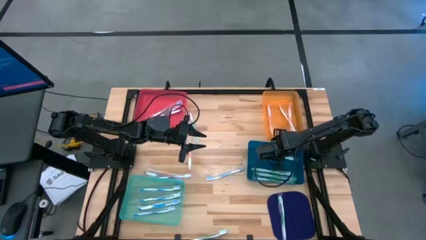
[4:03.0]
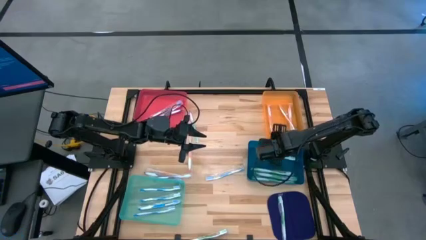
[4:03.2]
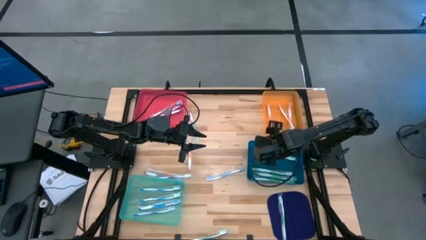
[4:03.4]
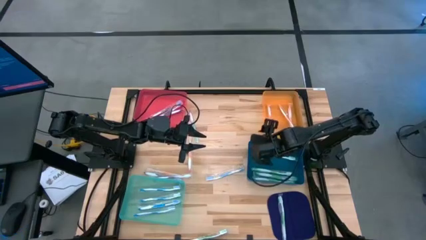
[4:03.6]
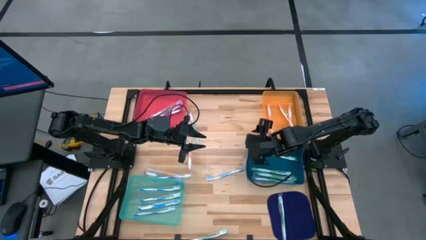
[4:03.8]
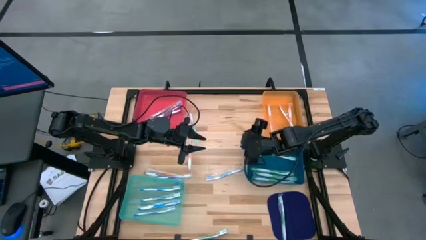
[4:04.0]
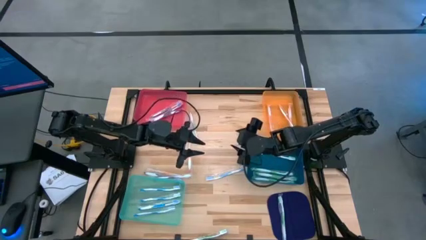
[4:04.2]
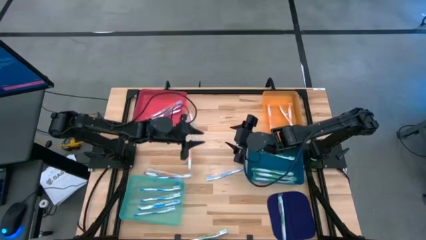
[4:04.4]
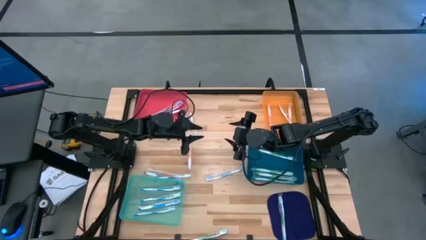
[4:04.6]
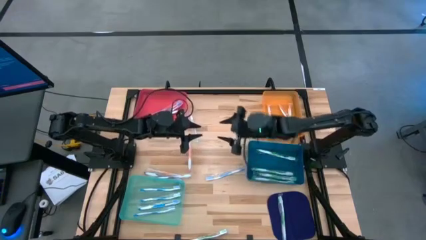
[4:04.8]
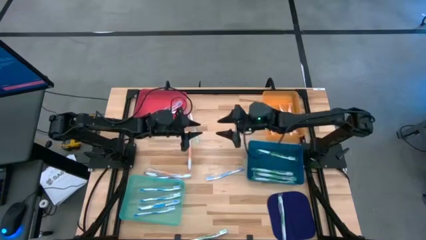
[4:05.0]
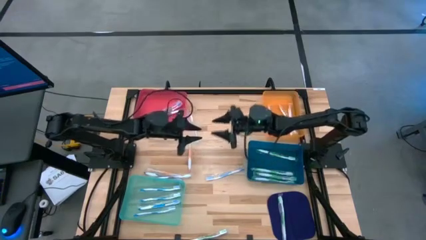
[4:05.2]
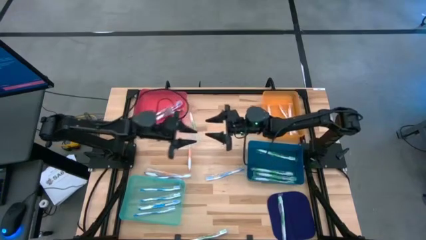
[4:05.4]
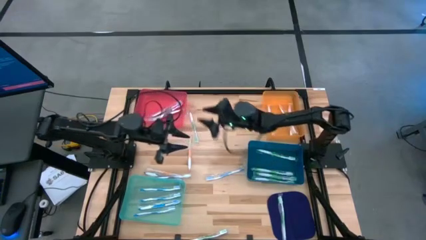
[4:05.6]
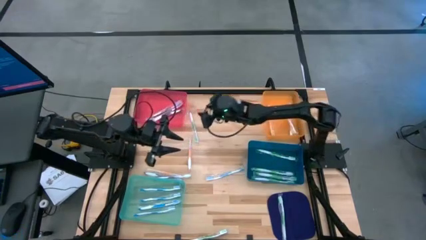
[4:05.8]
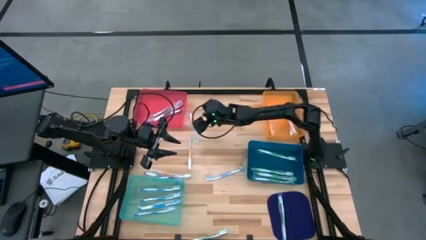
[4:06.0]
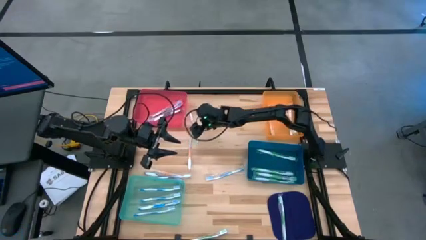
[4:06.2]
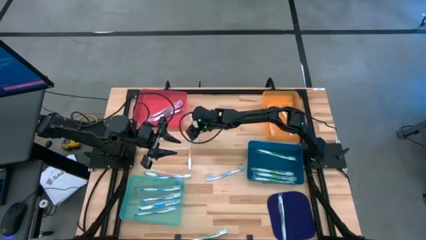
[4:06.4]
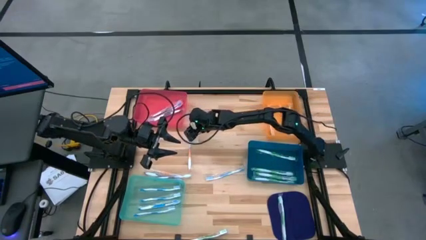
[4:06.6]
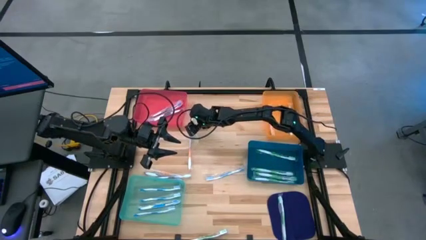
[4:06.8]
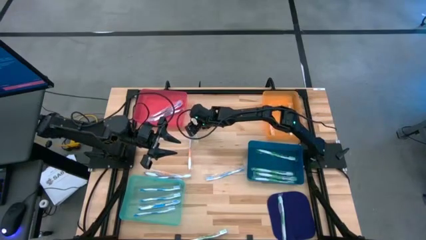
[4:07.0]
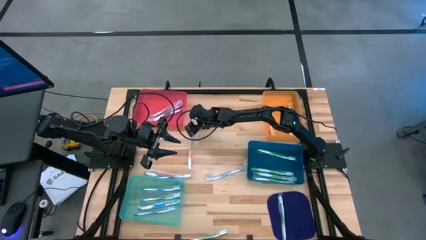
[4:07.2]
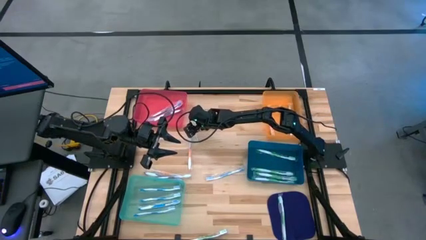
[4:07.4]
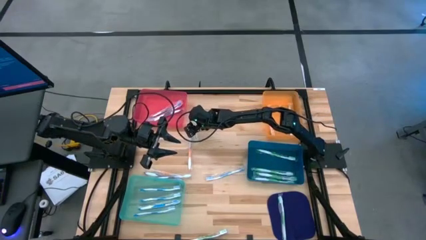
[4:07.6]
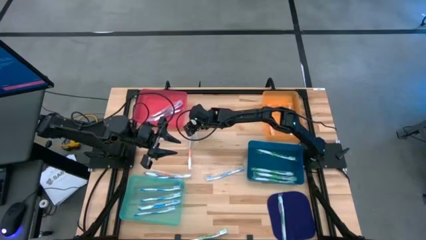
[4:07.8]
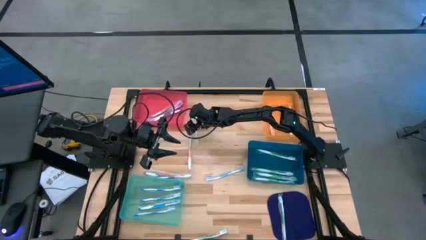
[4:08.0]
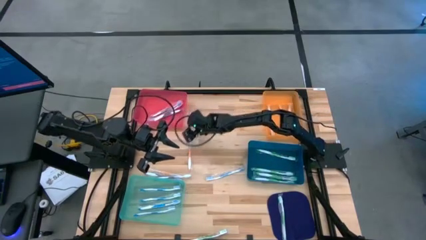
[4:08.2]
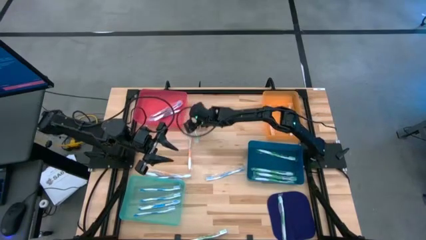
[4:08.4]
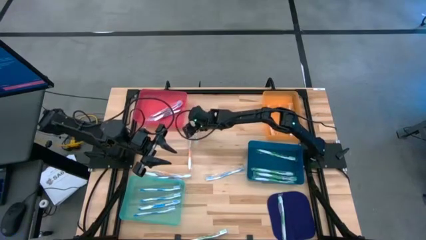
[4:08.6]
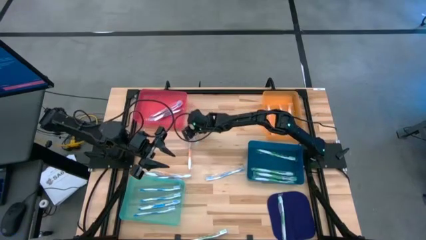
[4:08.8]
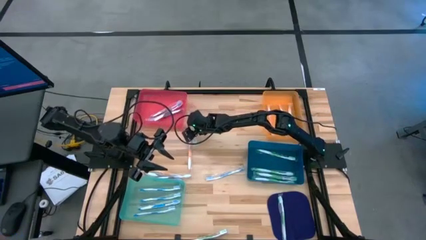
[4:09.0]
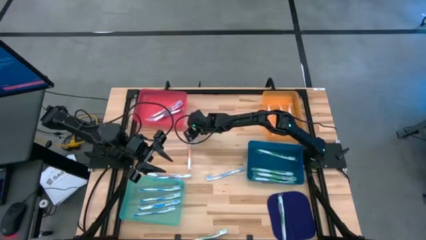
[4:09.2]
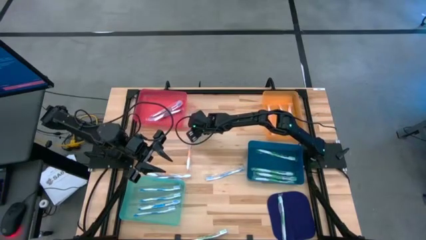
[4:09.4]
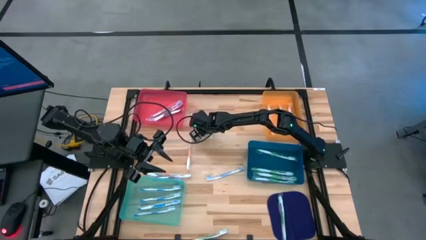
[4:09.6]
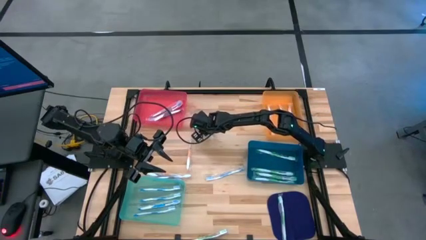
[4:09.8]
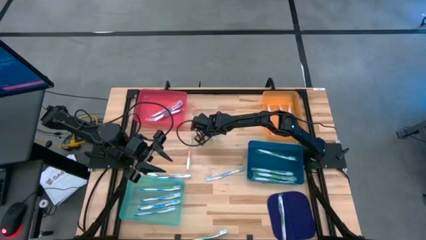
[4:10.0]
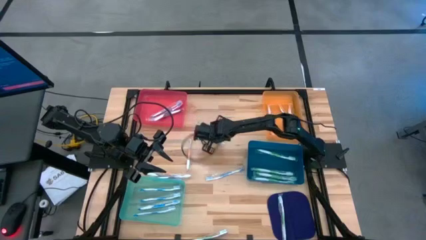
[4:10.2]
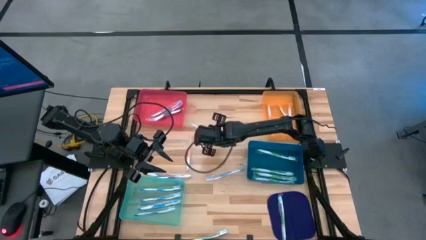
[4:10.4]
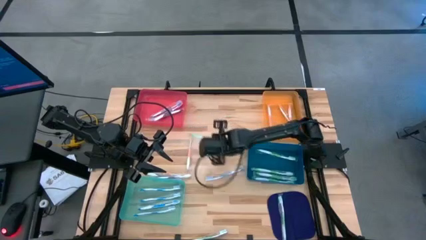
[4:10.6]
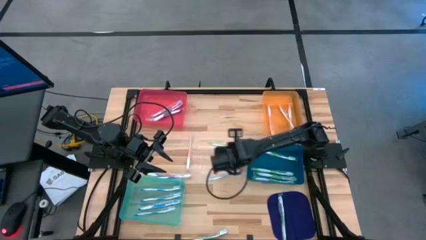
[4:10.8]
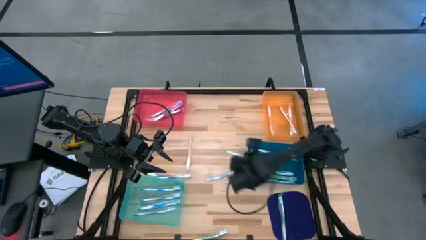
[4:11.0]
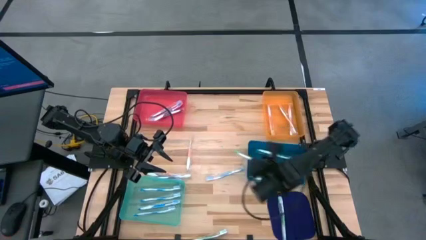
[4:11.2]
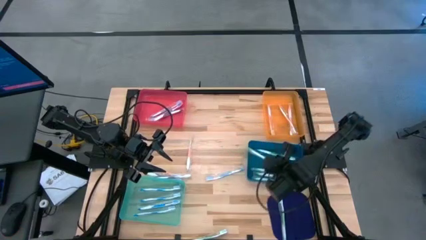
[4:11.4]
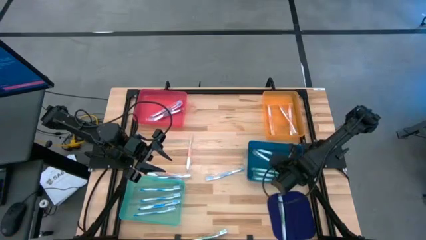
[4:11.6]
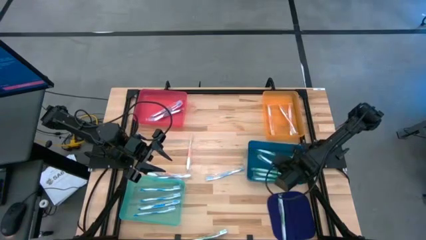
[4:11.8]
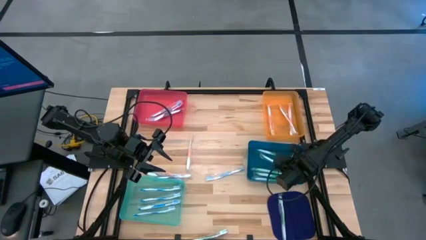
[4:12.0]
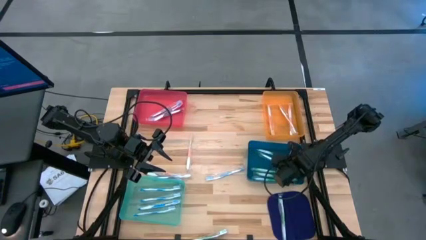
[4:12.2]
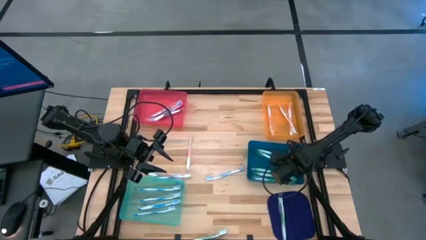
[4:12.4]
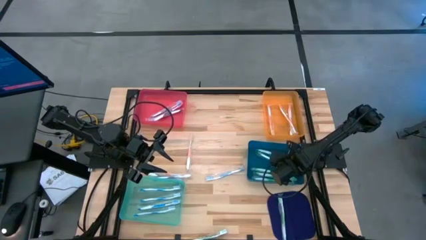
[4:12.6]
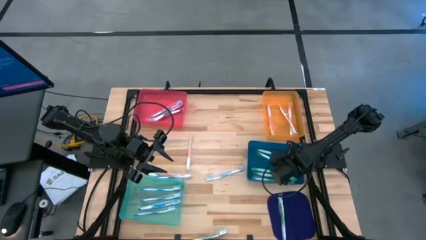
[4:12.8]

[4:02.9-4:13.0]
Task: Pick & Place Toothbrushes
Put the green toothbrush into the blue bin

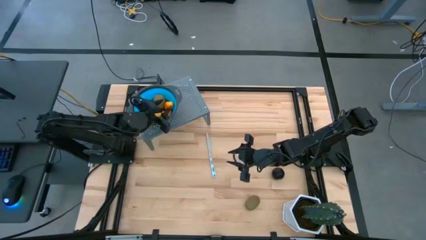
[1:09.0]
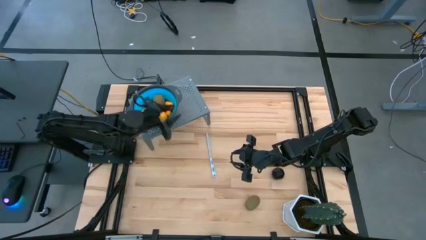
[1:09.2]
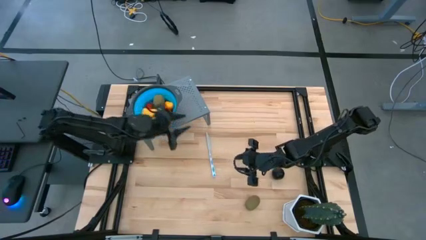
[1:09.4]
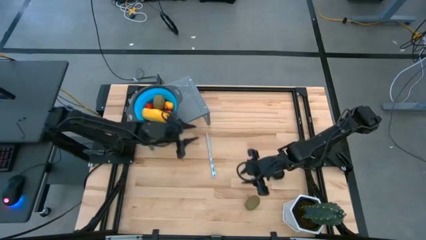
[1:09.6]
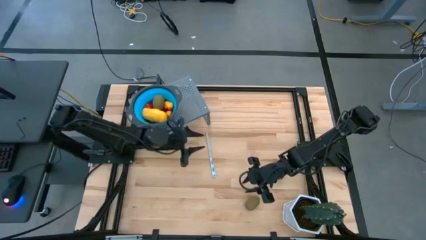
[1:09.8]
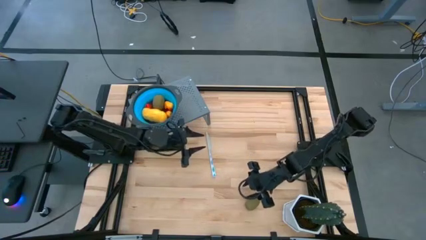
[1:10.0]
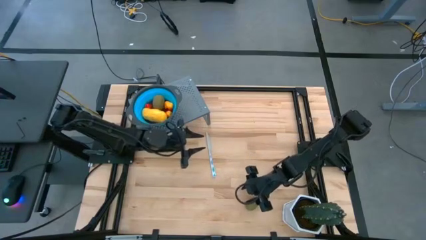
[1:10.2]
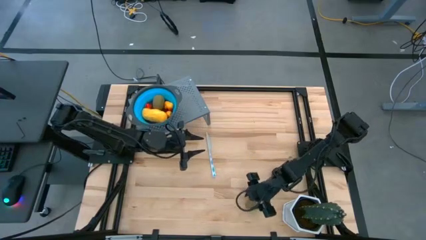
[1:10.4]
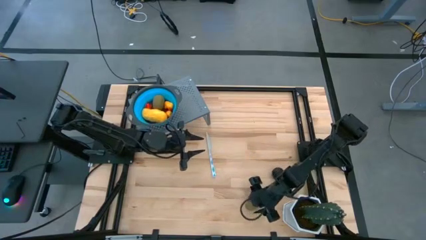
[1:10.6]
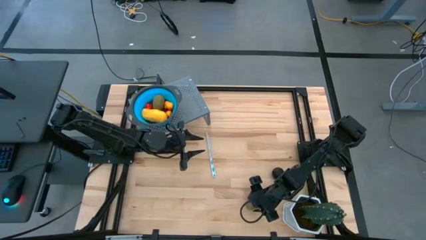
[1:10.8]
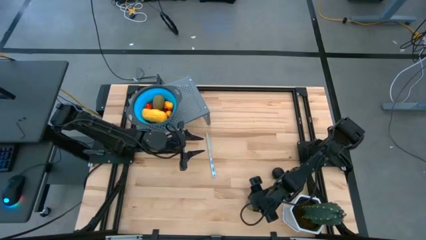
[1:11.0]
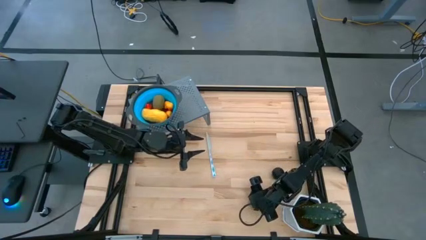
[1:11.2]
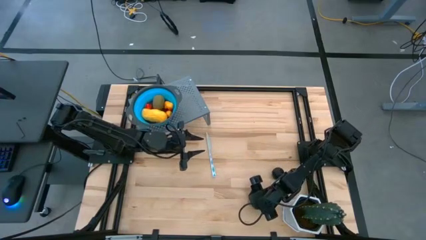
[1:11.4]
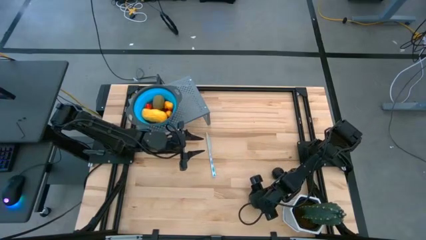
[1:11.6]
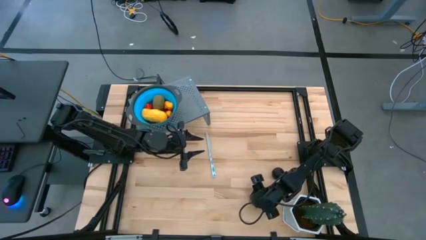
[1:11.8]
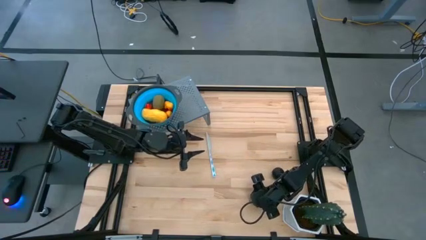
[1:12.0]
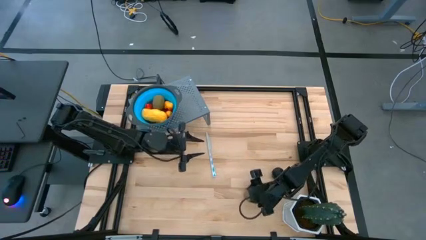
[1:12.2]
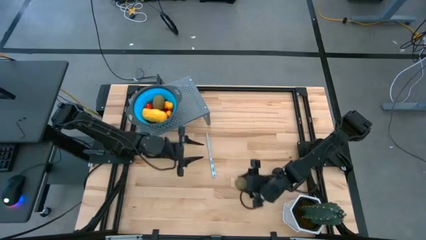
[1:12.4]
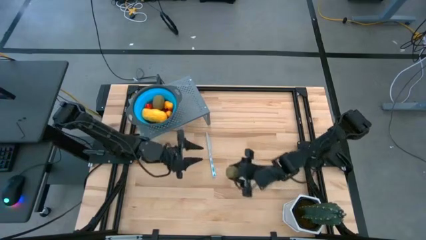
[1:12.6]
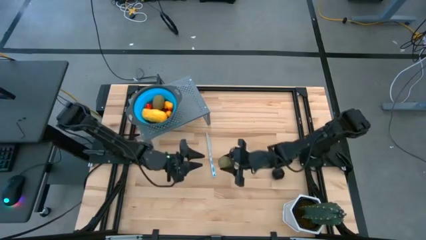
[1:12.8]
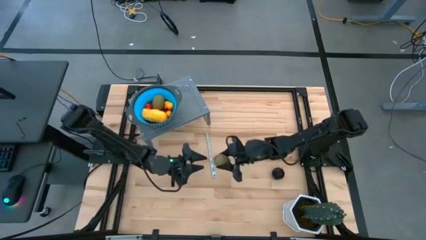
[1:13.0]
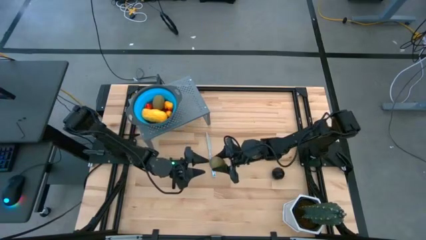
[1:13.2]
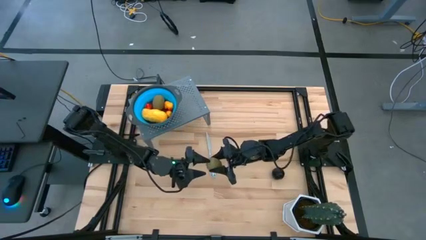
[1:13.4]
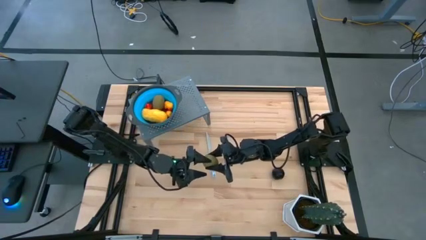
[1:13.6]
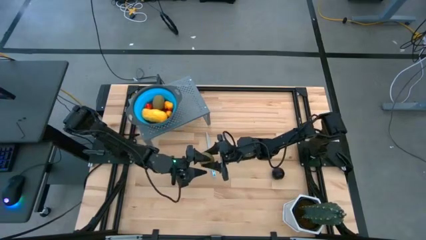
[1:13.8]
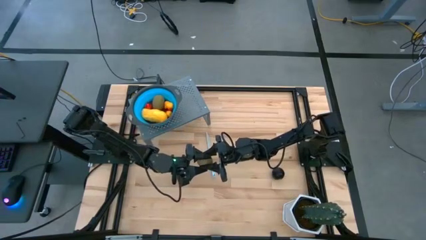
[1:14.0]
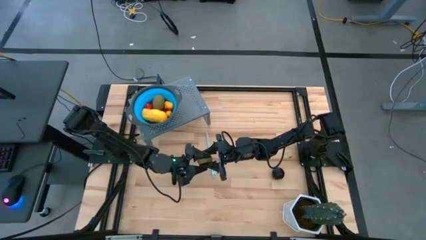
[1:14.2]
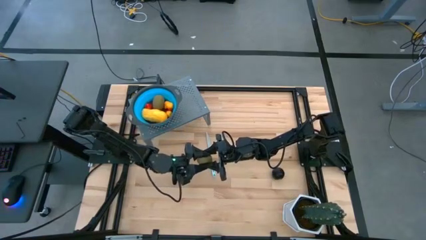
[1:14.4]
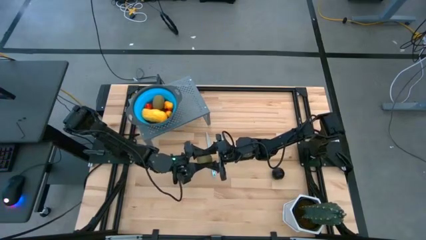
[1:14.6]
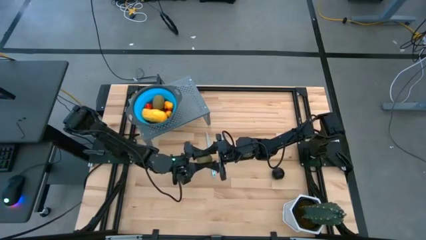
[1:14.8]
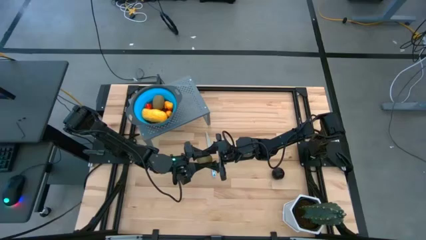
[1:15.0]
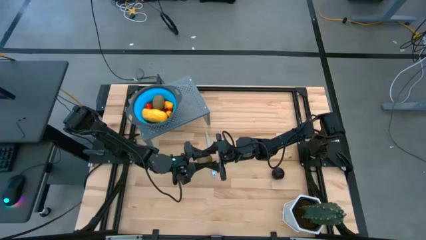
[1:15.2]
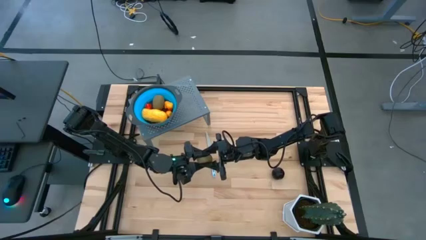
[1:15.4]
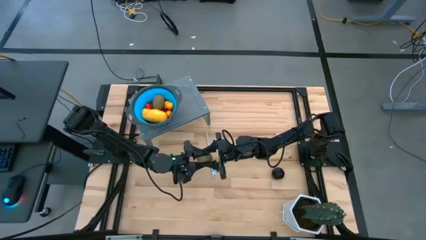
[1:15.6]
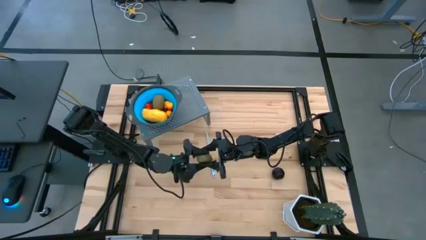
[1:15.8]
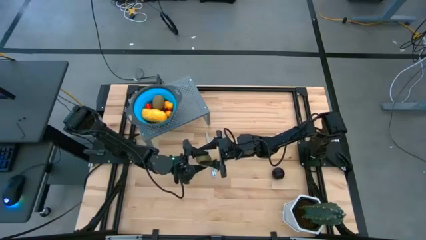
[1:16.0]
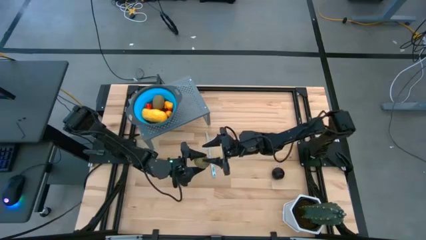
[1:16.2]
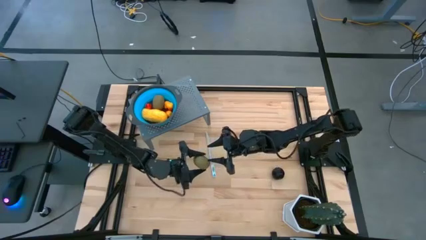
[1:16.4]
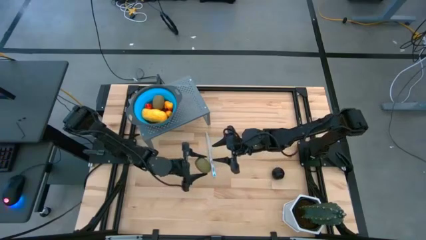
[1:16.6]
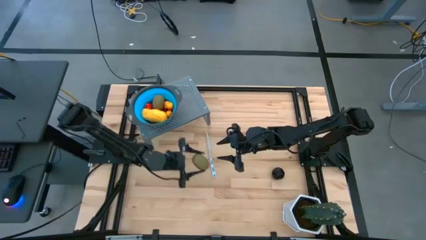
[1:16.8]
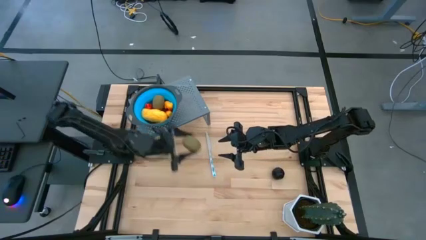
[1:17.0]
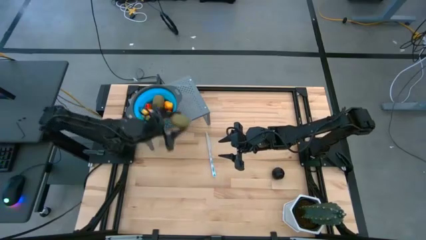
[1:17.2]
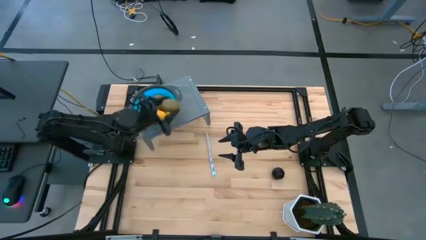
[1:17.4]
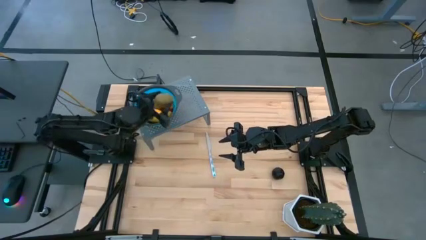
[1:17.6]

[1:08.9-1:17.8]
Task: Pick & Place Fruit
Put the brown kiwi into the blue strainer bowl on the shelf
